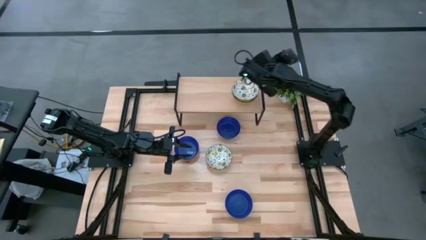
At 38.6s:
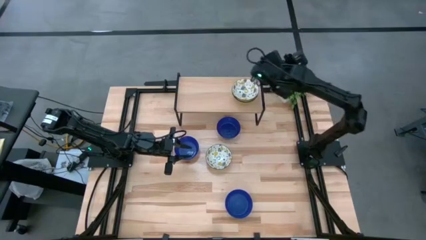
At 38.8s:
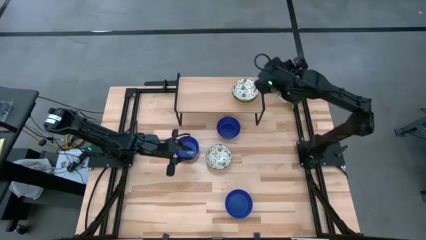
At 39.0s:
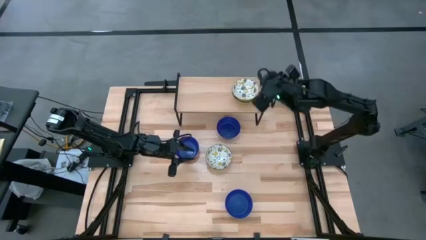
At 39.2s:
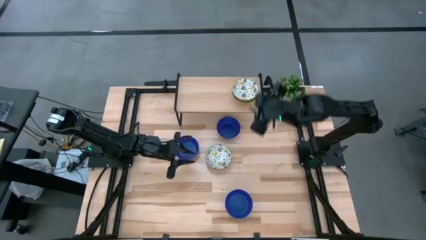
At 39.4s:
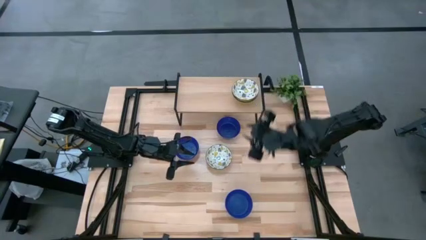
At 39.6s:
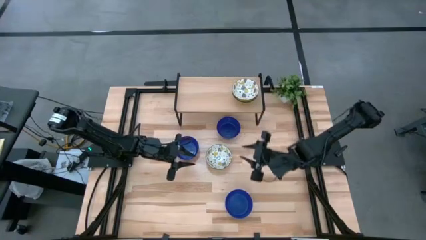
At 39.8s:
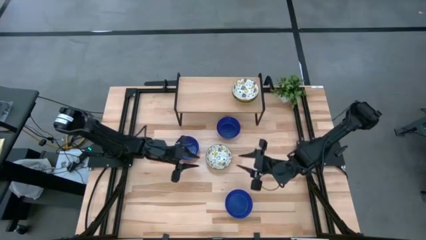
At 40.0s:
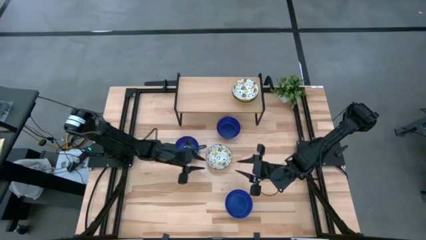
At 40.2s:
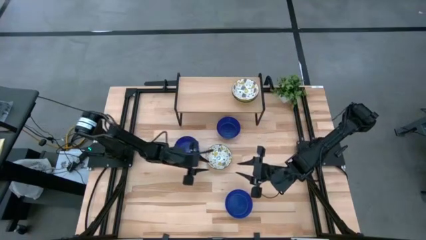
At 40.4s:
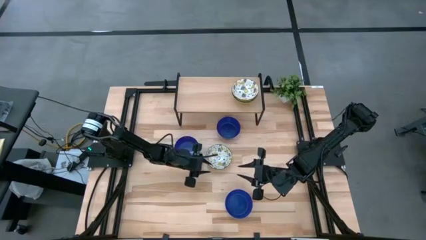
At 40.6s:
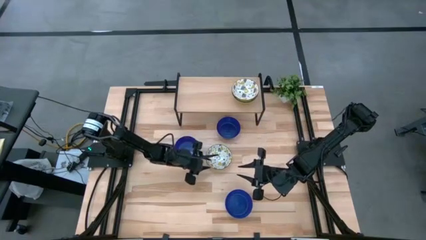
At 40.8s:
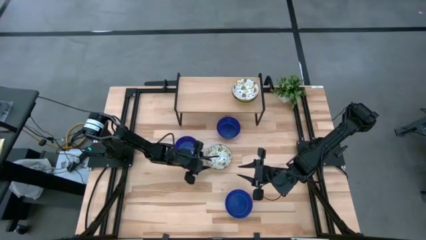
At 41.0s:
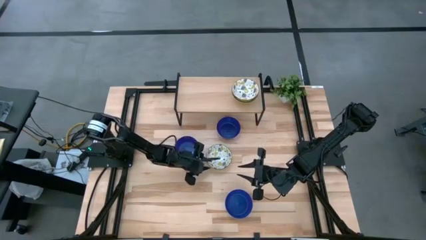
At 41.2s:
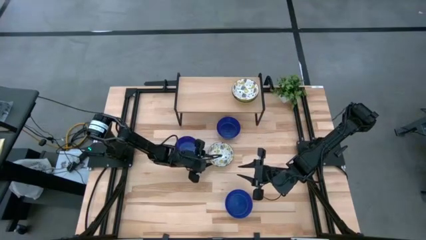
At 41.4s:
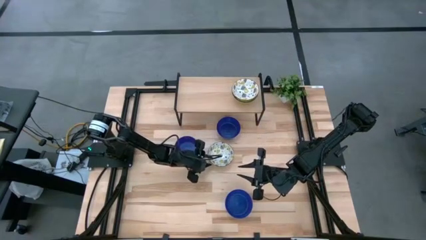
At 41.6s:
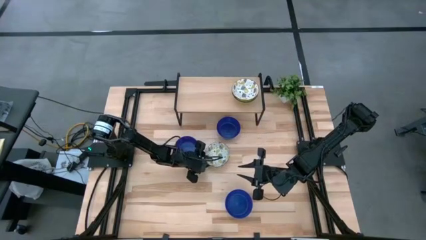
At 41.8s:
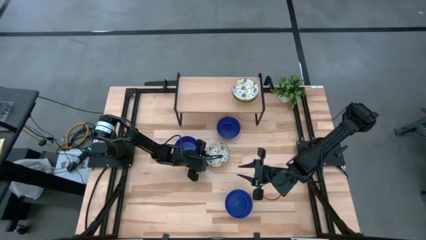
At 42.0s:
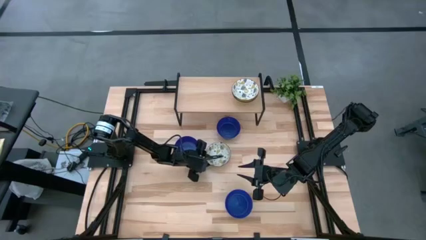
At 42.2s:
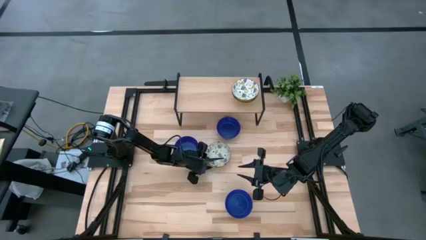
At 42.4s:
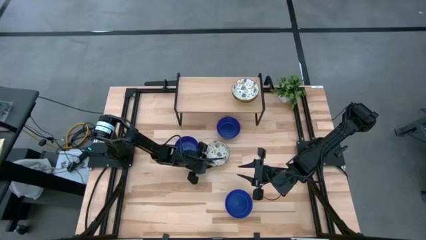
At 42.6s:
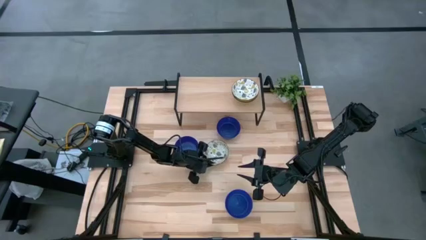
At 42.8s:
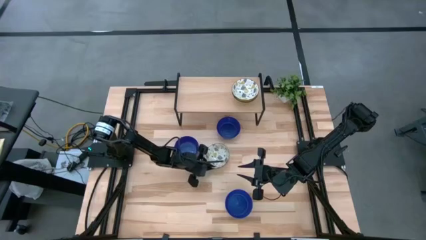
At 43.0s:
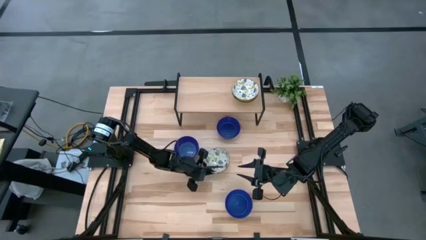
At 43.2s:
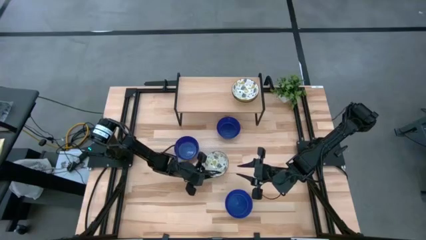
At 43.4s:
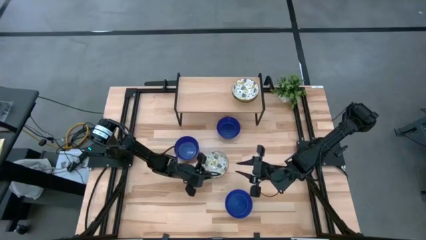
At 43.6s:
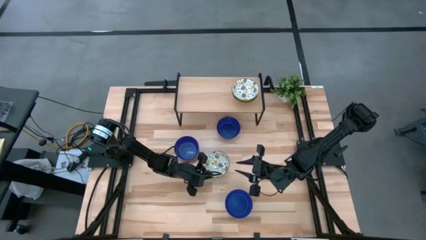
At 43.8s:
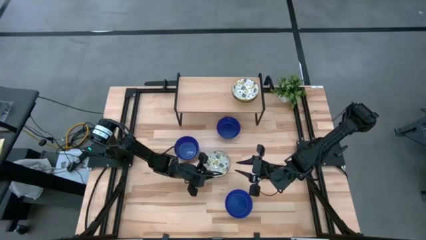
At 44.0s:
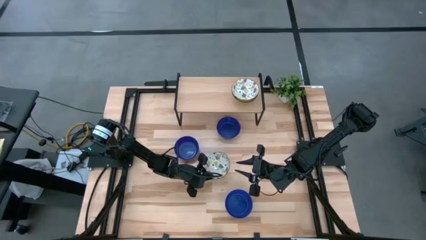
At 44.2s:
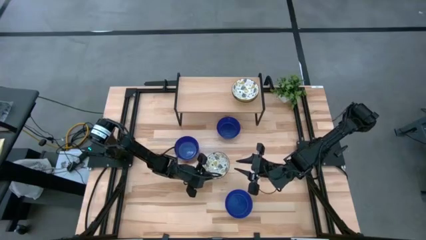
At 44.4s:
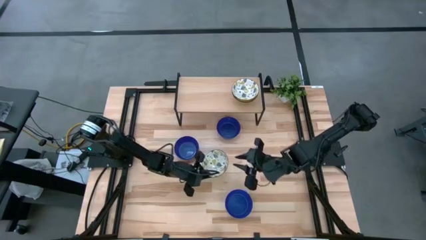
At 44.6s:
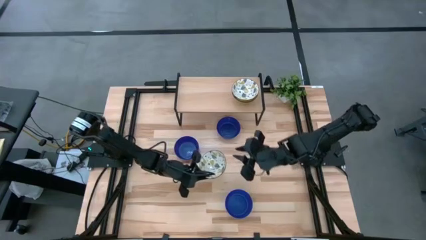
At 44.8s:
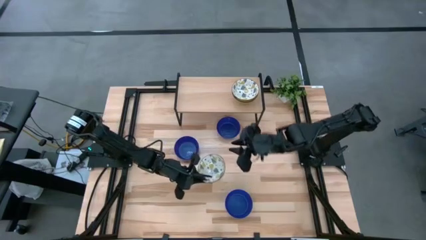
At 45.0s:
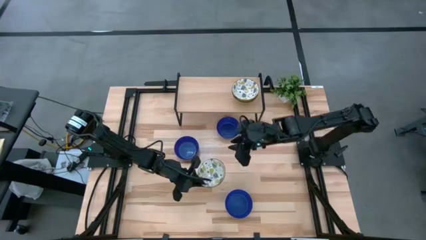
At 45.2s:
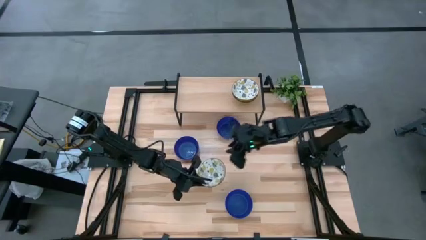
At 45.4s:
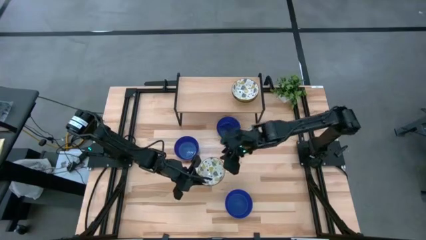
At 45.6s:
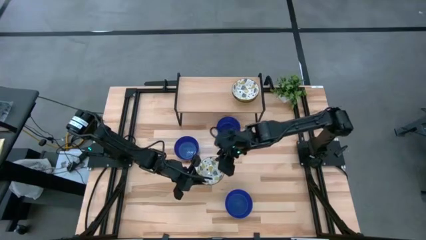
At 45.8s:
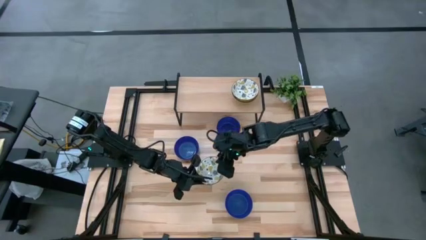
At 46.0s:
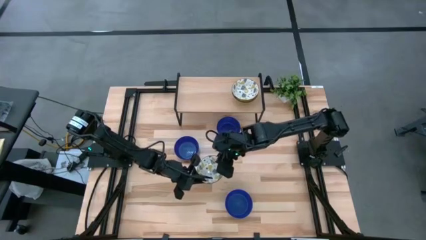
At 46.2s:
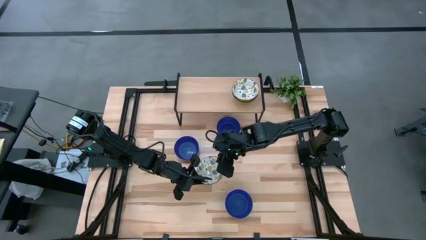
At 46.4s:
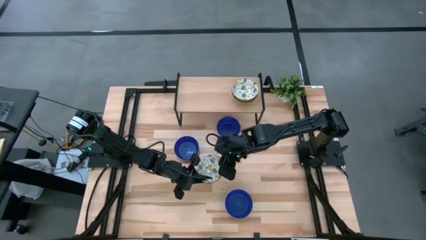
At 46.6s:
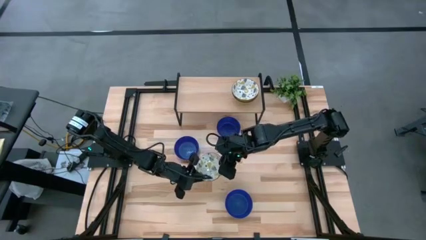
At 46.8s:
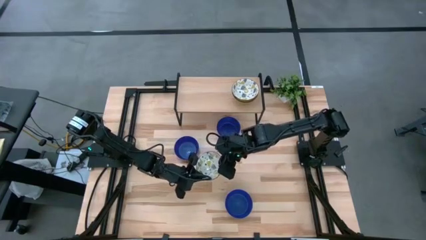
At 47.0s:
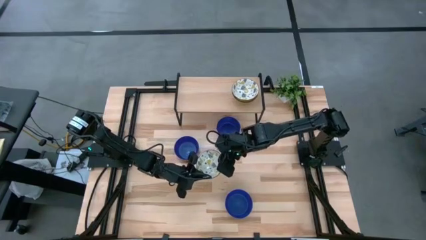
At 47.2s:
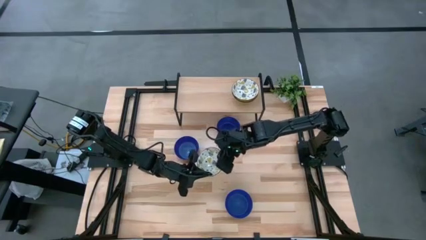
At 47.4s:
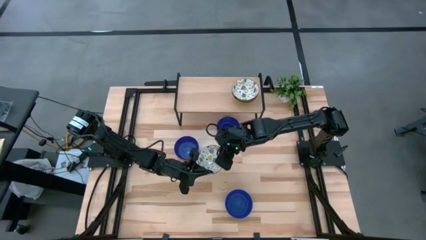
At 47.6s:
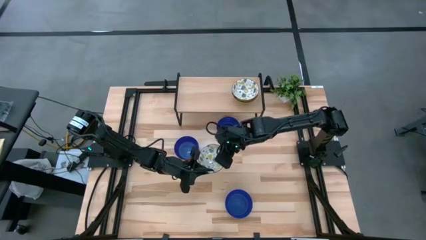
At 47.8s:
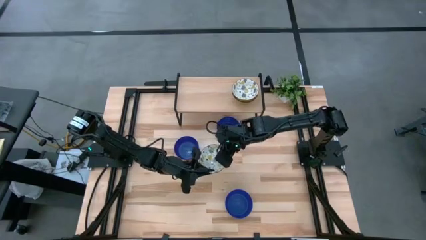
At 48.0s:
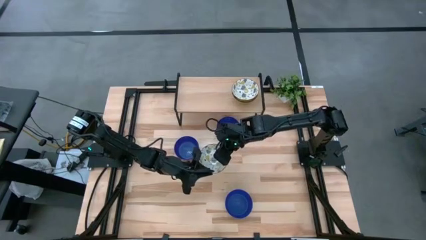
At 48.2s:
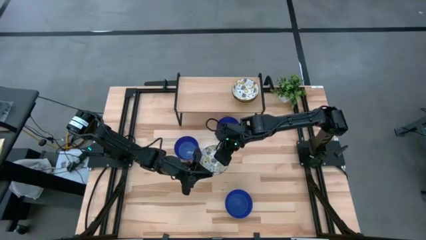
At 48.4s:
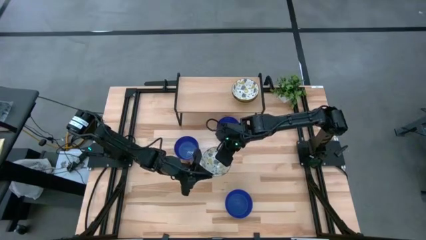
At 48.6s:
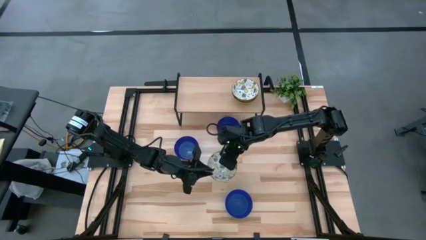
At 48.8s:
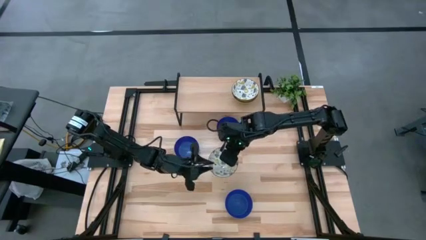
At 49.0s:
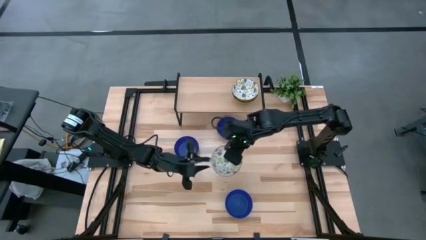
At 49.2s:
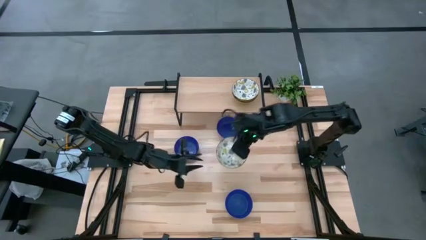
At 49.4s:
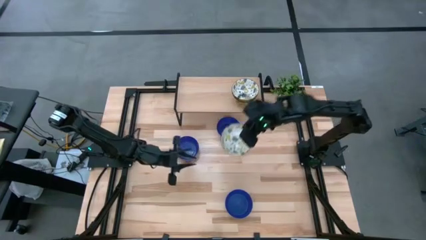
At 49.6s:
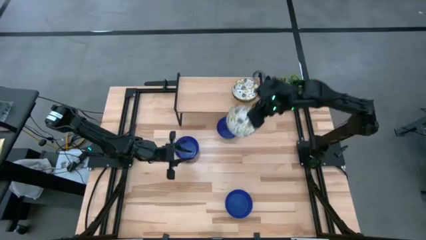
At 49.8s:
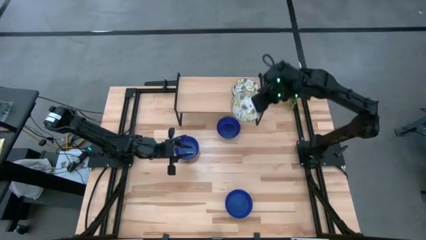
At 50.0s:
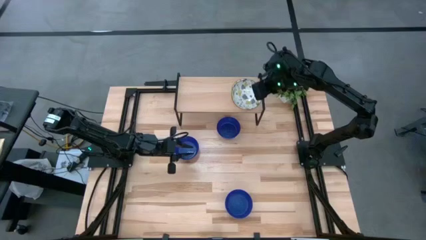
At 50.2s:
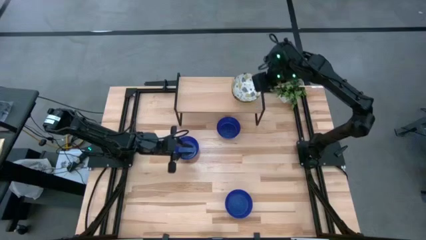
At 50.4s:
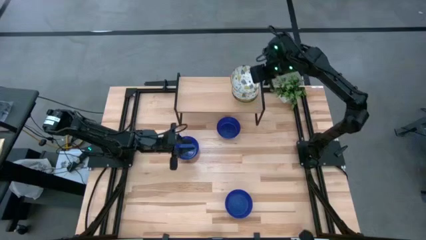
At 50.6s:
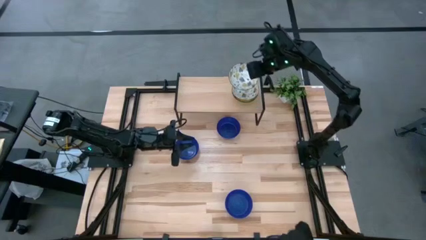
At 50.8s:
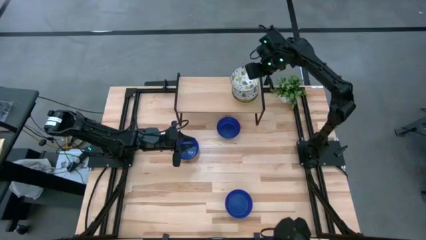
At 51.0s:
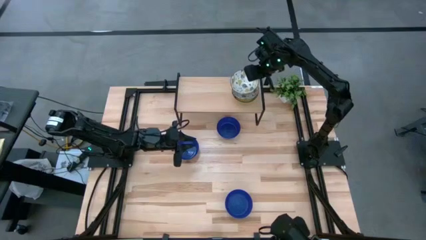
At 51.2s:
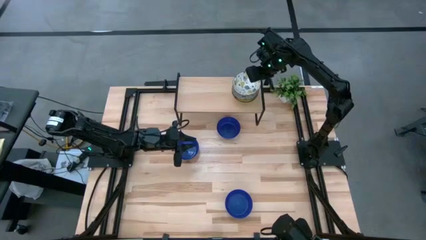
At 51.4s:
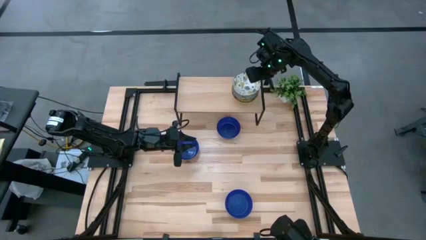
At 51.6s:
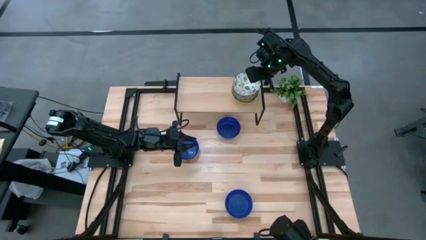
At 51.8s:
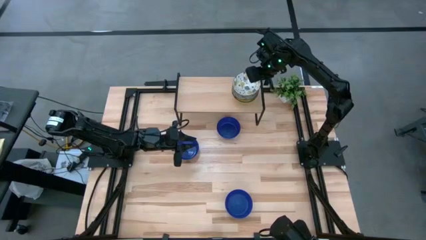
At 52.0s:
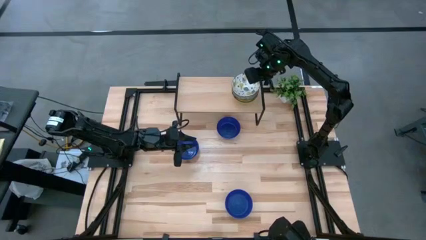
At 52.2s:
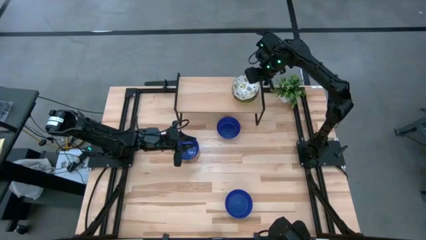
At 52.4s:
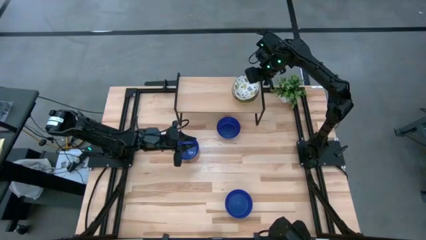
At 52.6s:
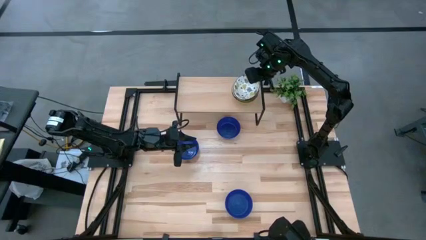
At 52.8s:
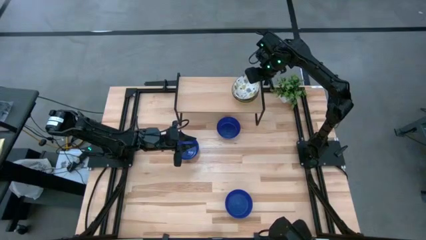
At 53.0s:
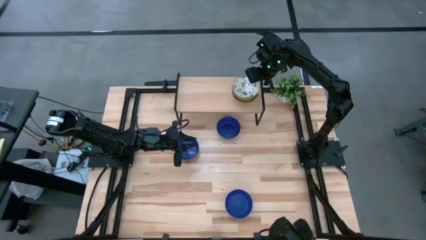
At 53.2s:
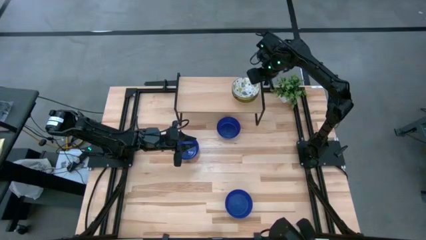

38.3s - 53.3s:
Task: Pick & Place Mini bowls
Stack the yellow patterned bowl on the yellow patterned bowl on the shelf
